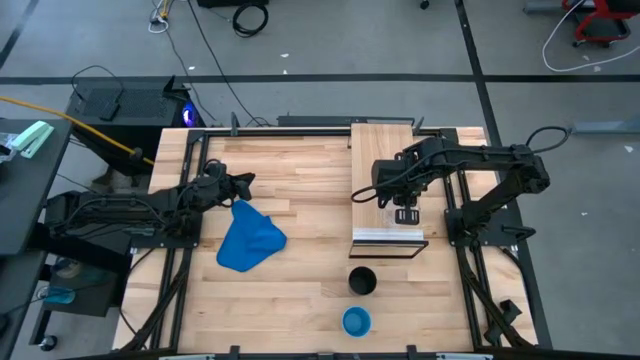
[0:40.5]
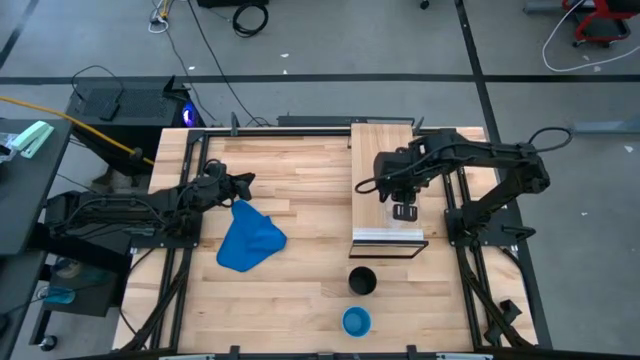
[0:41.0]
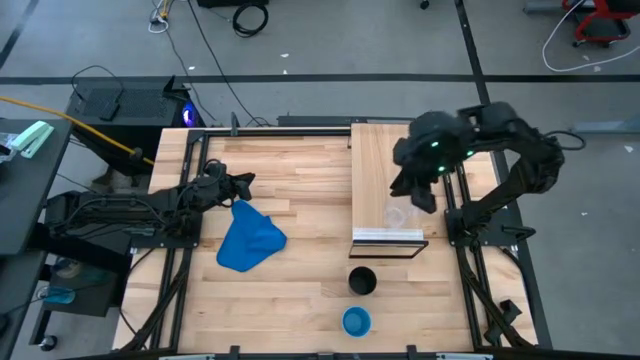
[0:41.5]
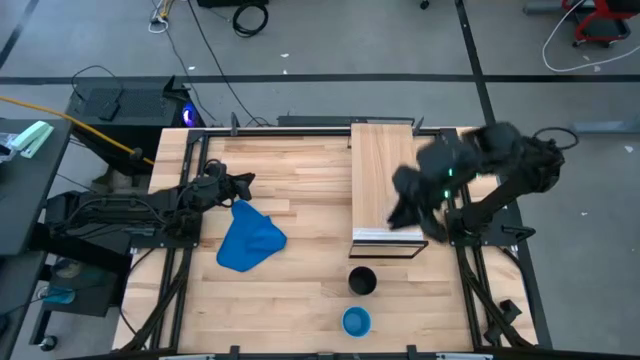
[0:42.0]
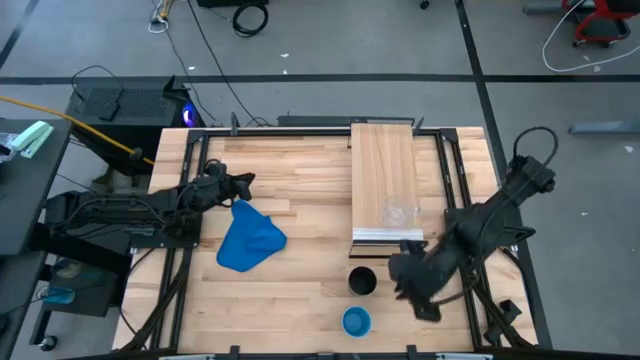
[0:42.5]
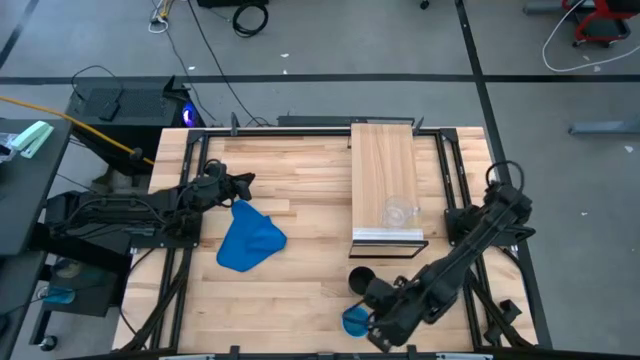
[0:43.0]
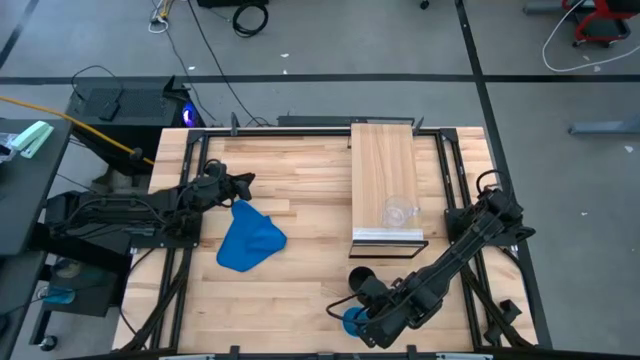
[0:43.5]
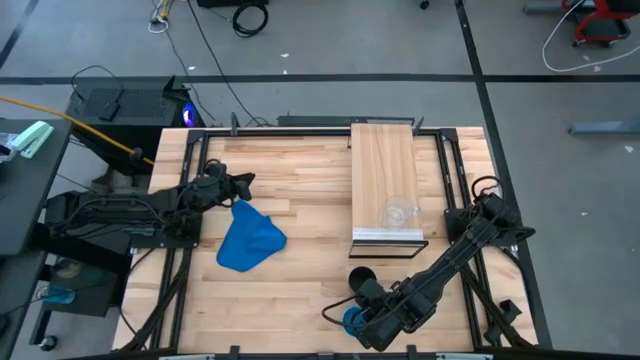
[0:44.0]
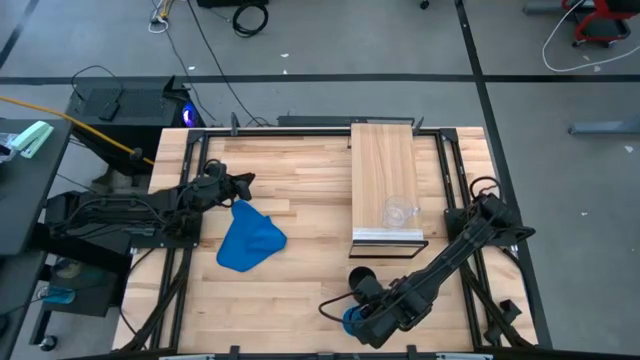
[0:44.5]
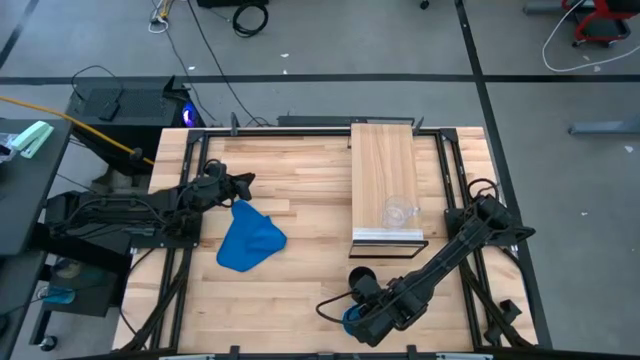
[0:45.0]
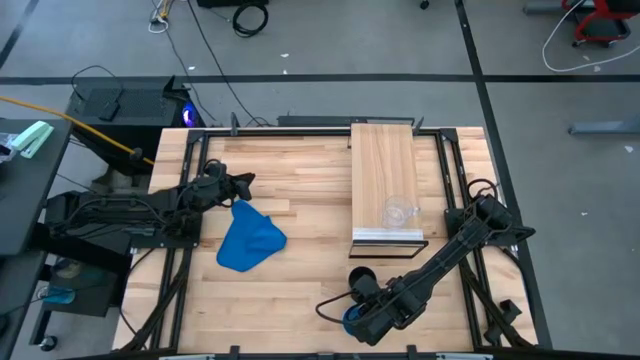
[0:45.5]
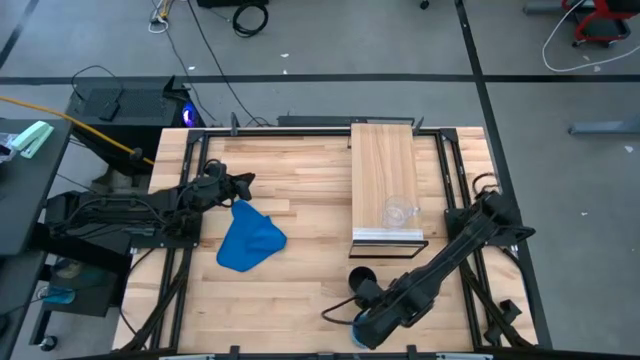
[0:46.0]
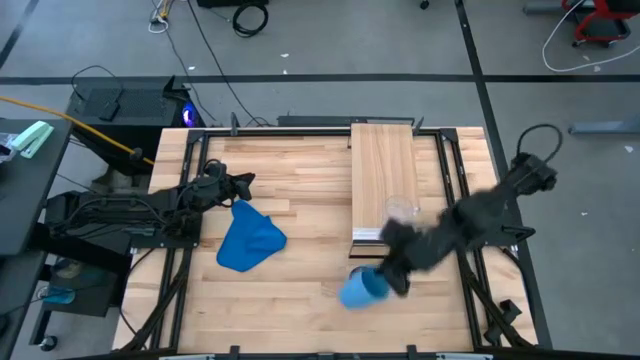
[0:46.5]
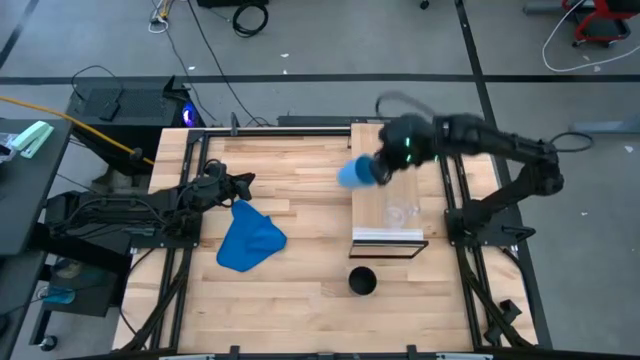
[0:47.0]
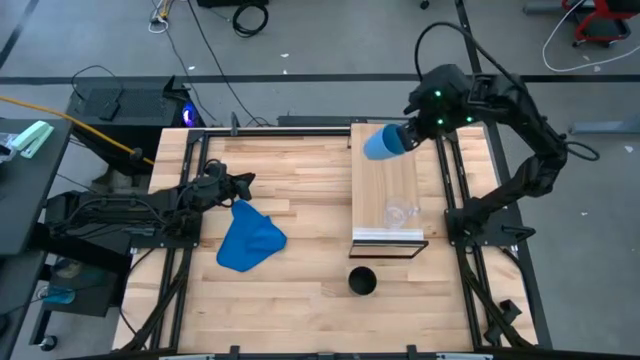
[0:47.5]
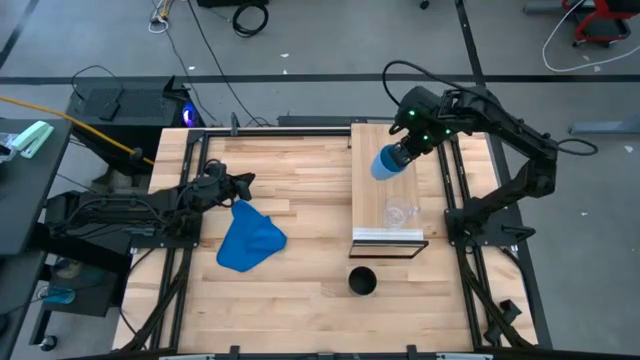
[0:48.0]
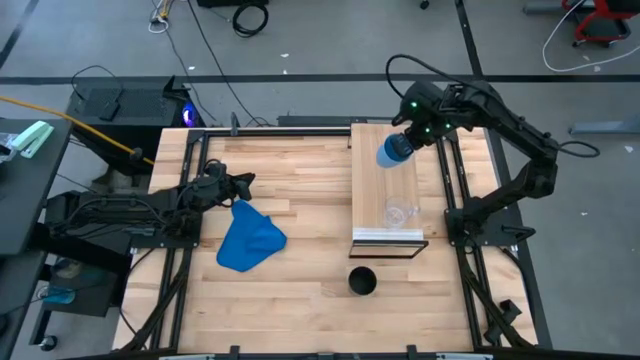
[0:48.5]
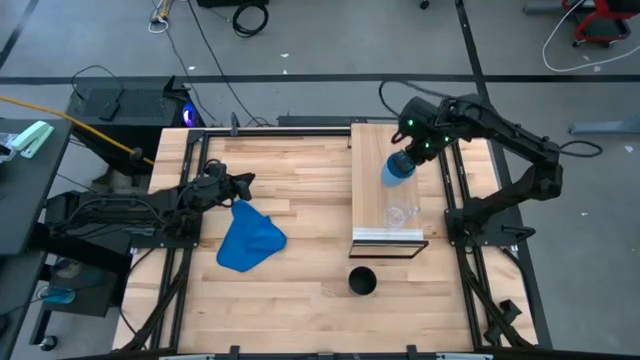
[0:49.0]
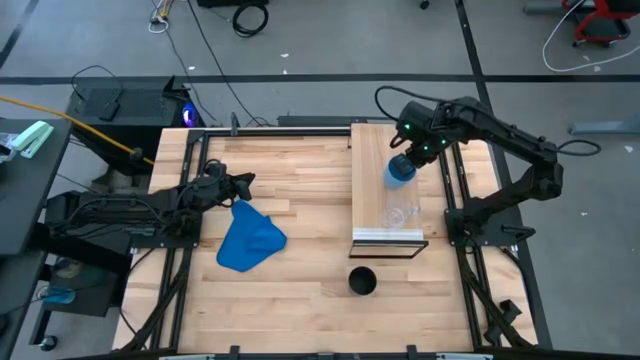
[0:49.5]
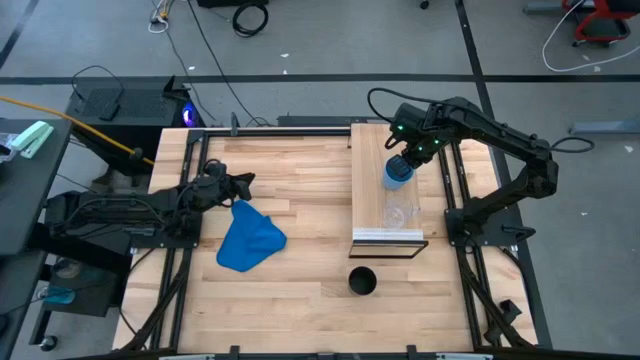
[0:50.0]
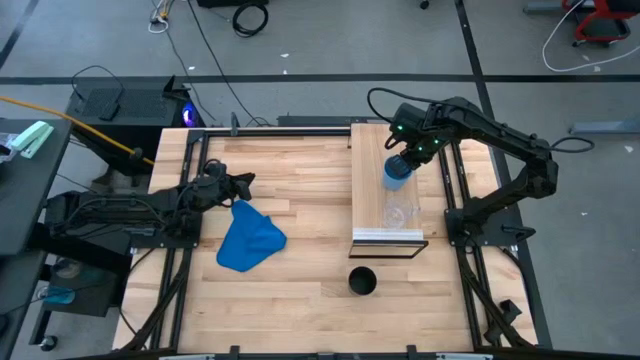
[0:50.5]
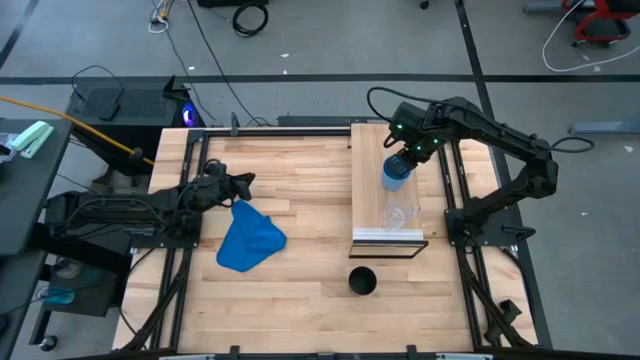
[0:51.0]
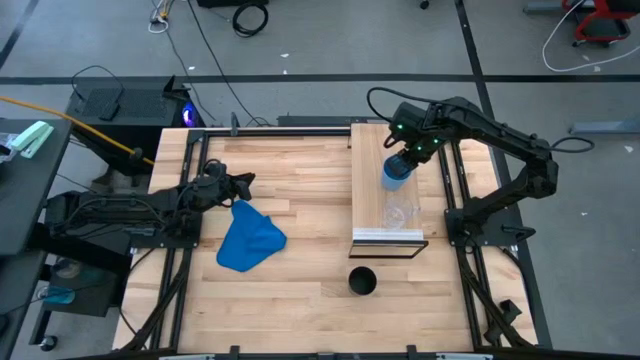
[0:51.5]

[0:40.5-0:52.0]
Task: Stack small to large cups/mugs on shelf
Put the blue cup on the shelf

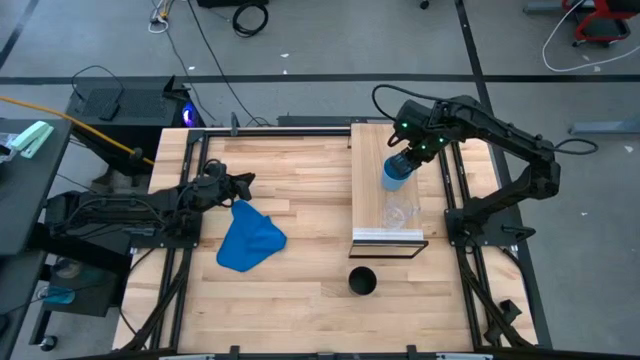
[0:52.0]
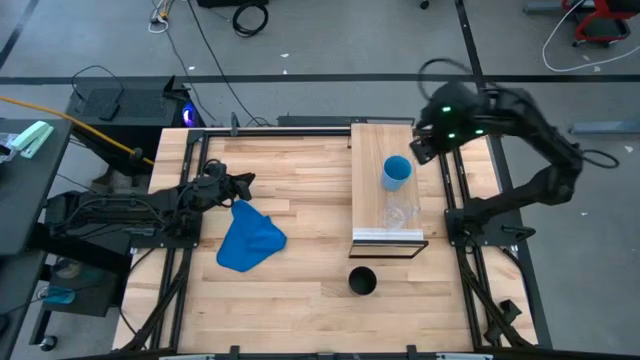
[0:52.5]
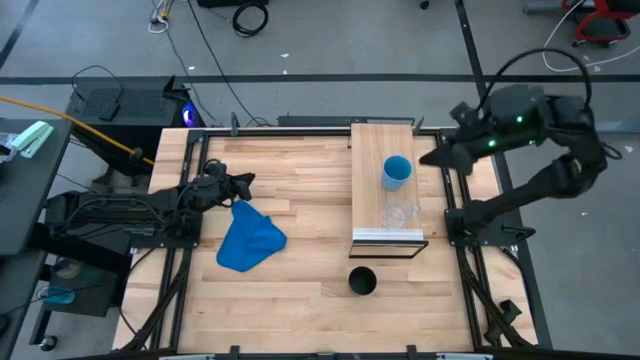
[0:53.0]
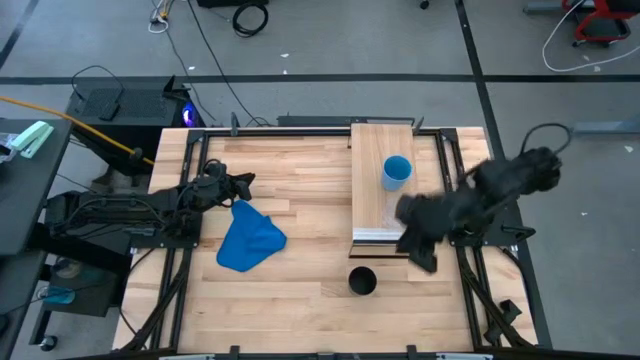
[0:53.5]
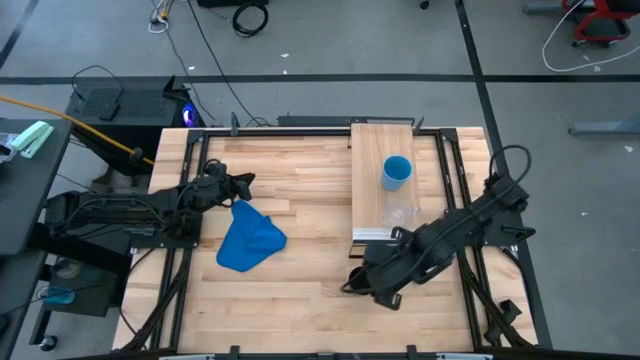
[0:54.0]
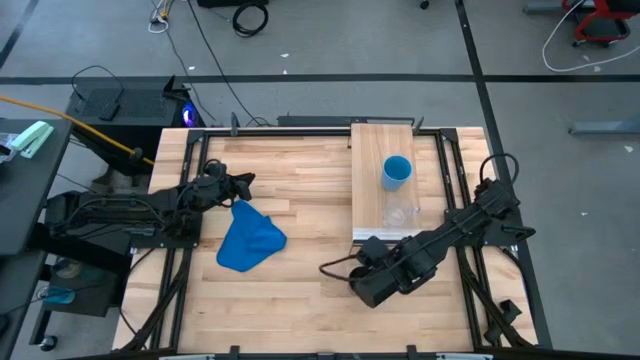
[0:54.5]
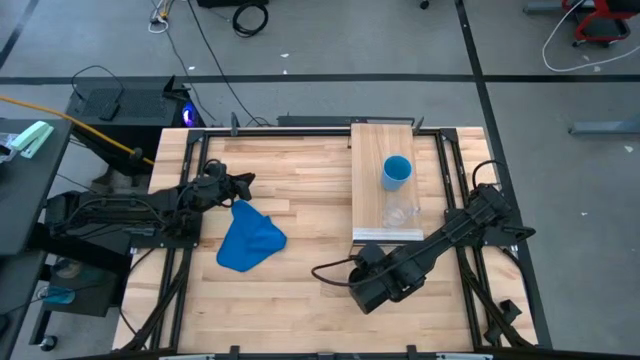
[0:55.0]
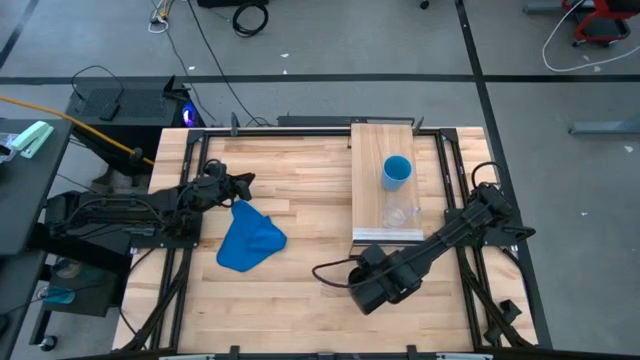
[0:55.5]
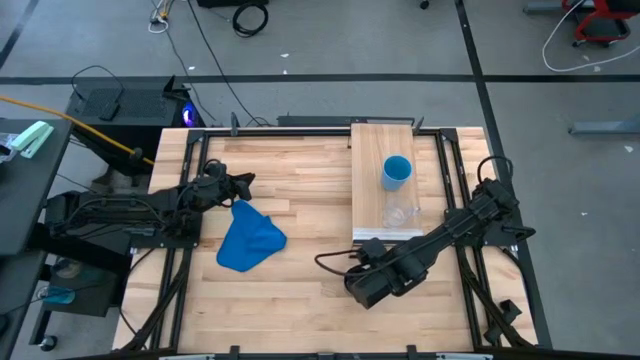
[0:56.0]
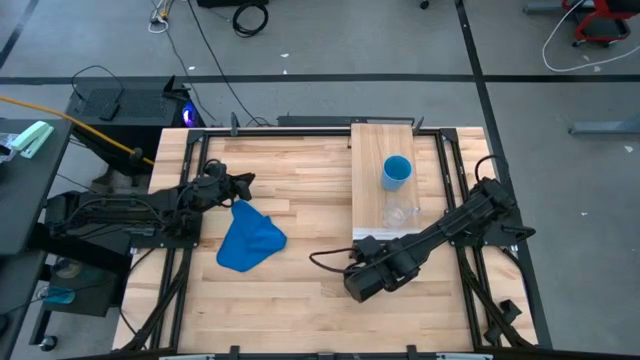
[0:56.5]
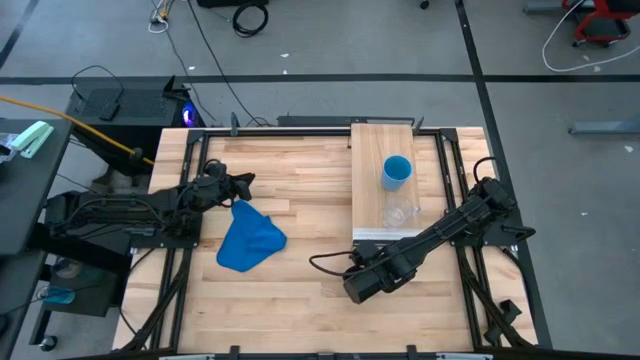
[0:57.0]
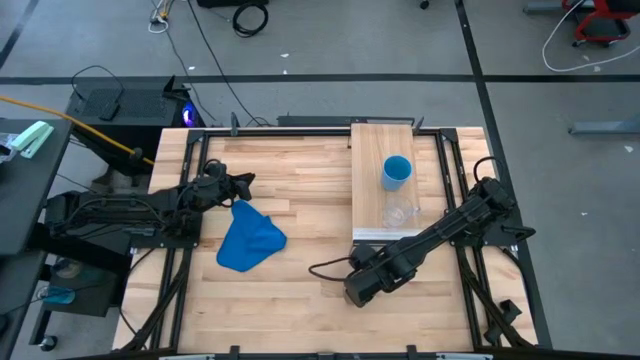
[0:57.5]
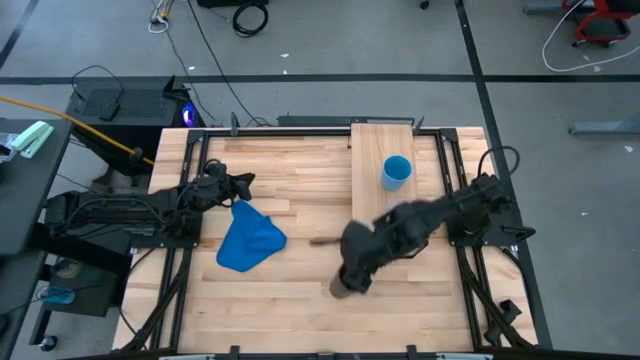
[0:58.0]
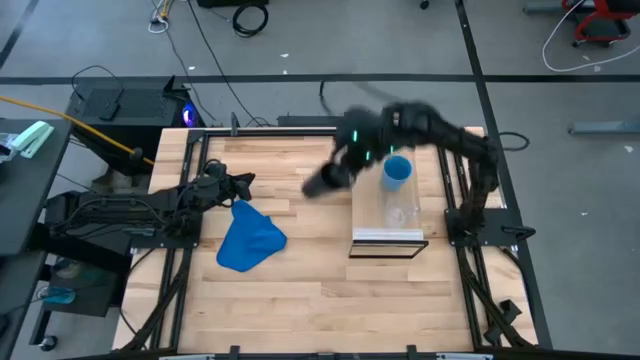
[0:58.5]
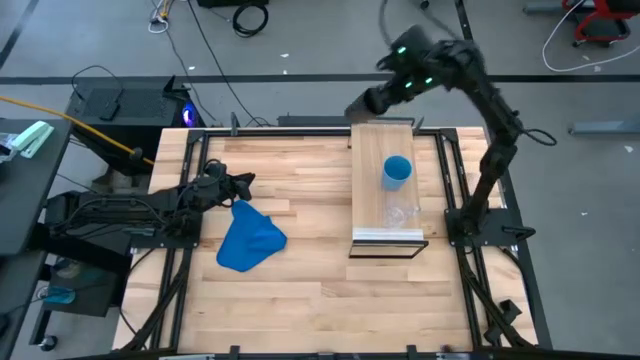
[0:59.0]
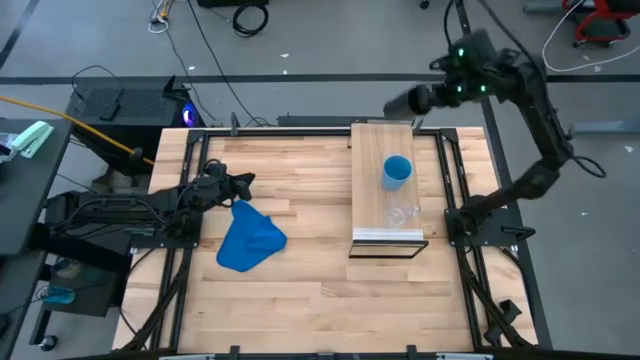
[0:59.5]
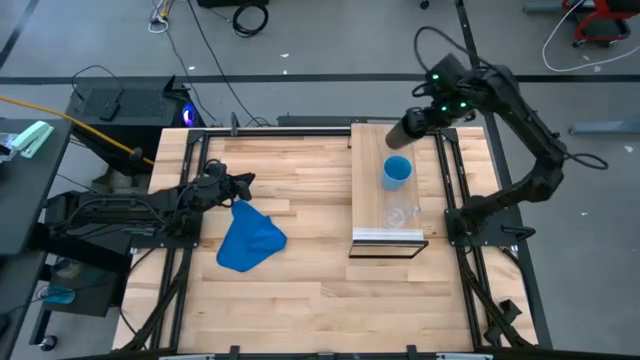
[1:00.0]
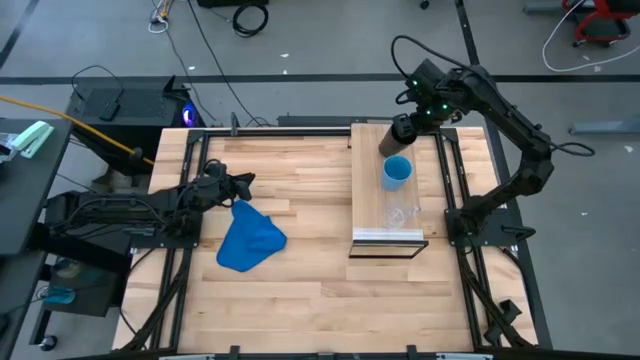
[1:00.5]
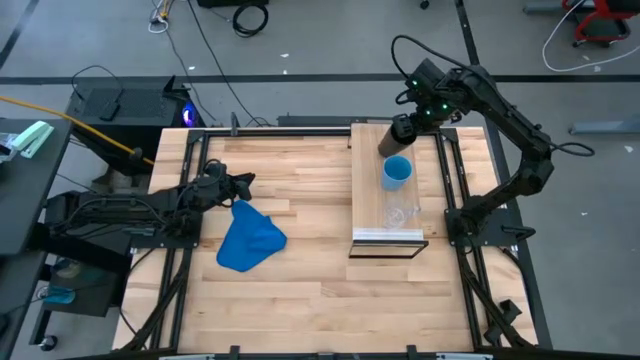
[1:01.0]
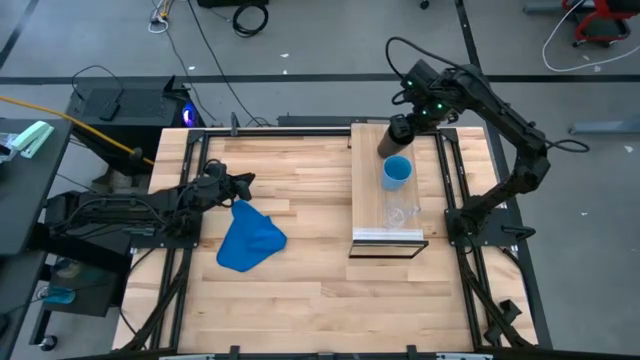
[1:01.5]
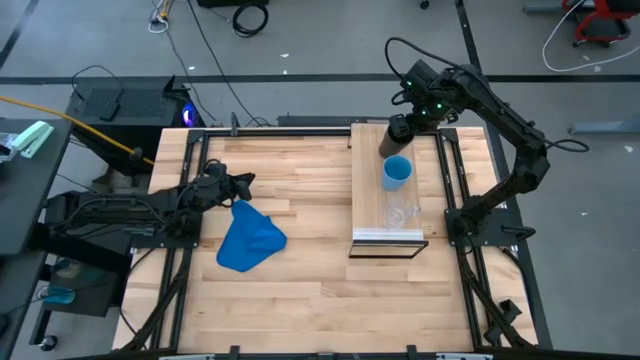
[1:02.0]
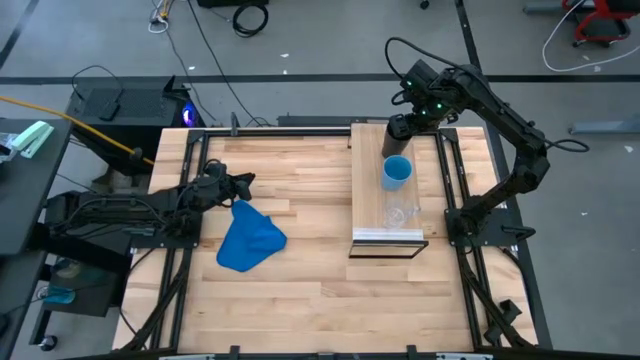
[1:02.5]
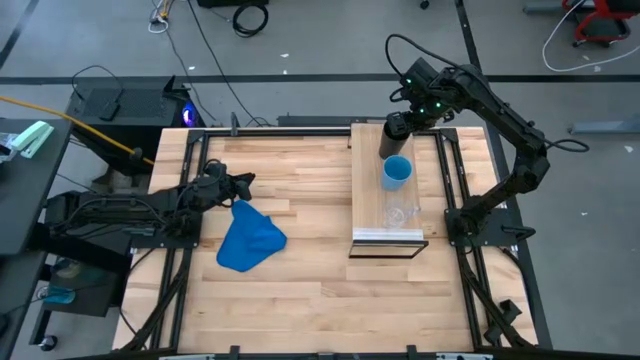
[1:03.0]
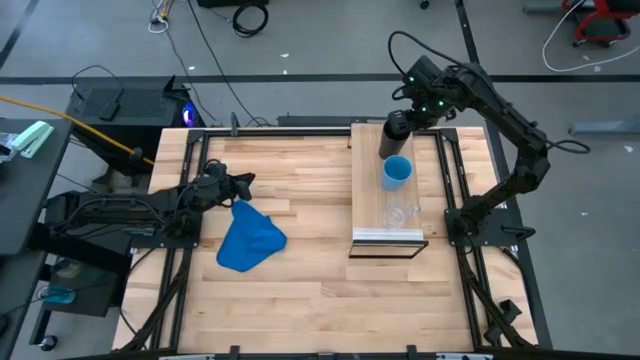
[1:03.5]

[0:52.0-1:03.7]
Put the black cup on the shelf
